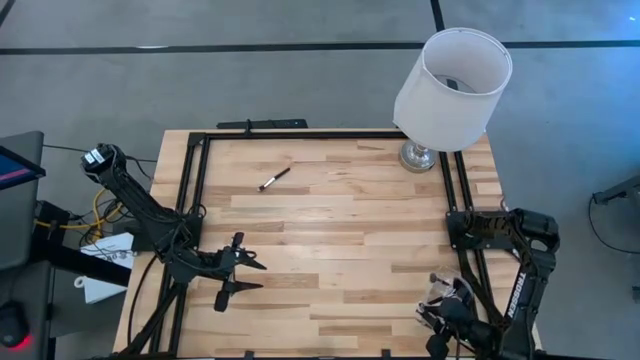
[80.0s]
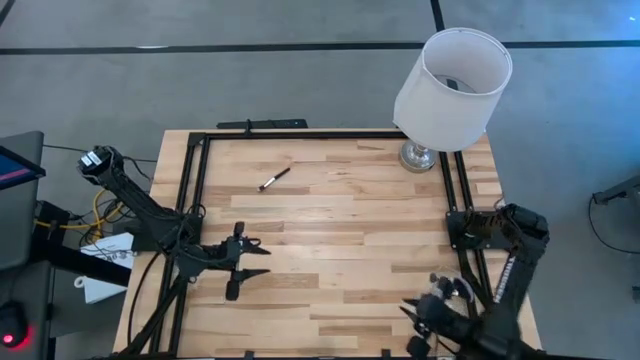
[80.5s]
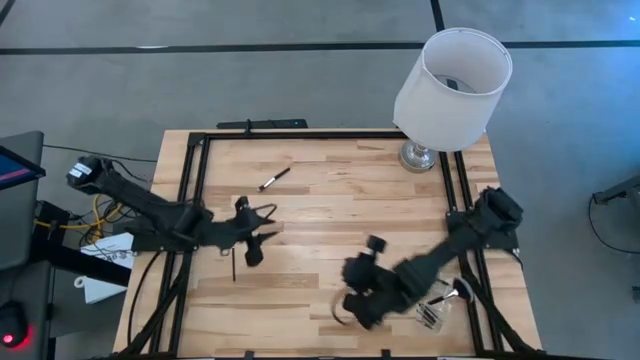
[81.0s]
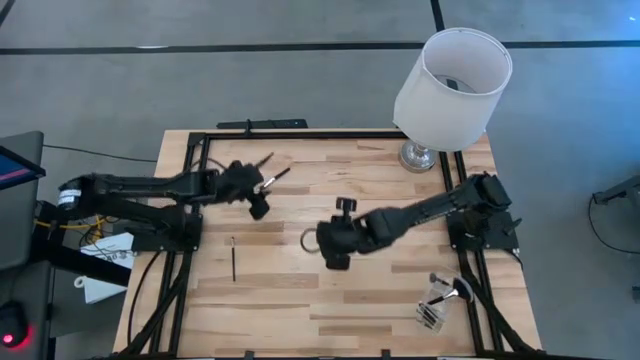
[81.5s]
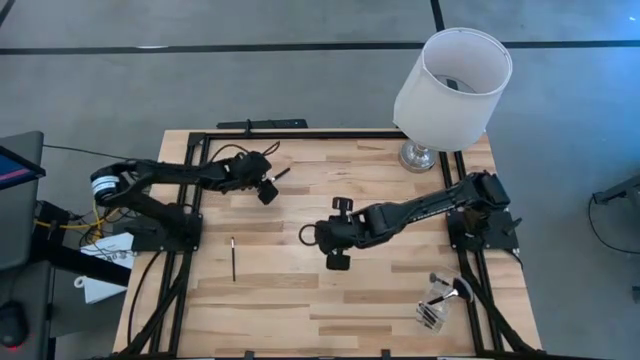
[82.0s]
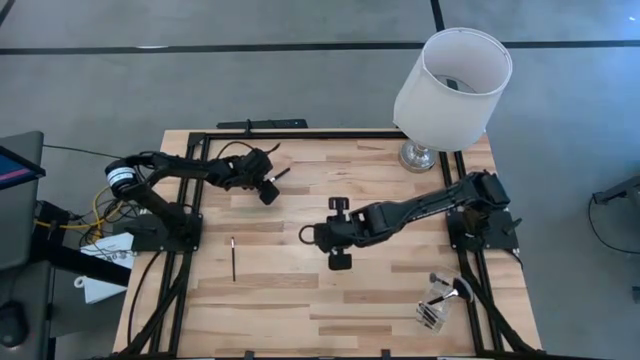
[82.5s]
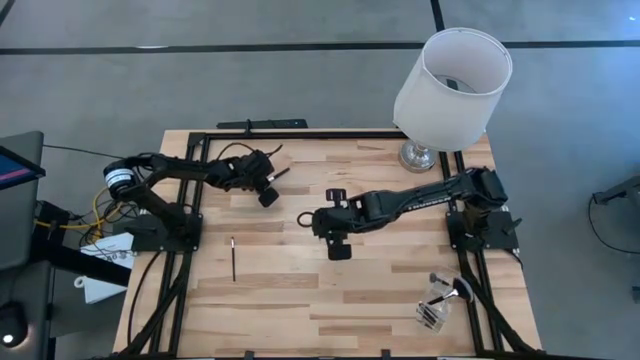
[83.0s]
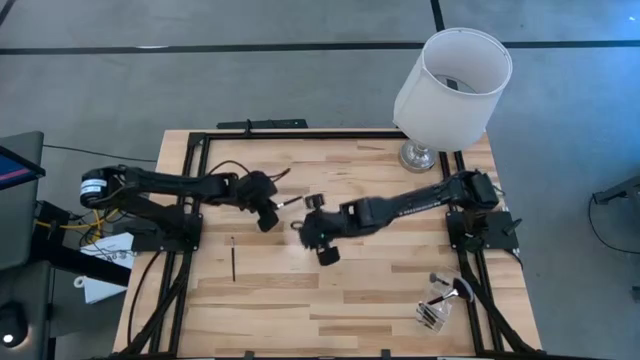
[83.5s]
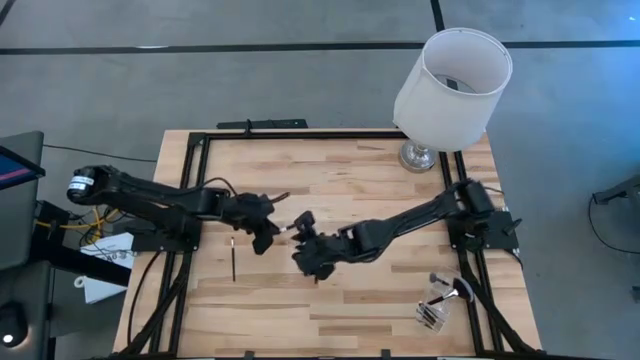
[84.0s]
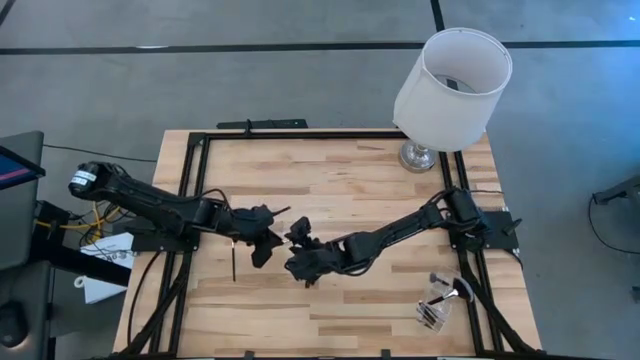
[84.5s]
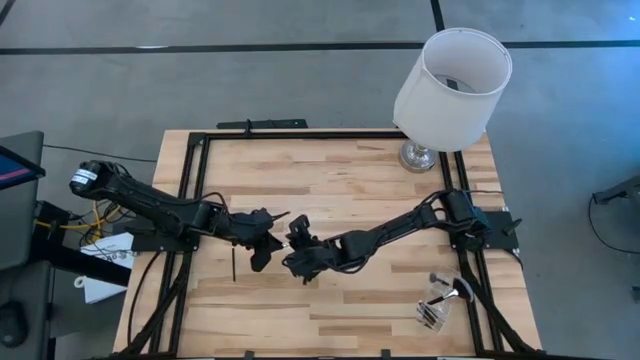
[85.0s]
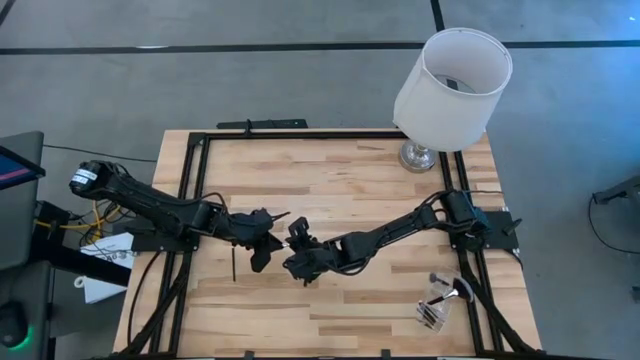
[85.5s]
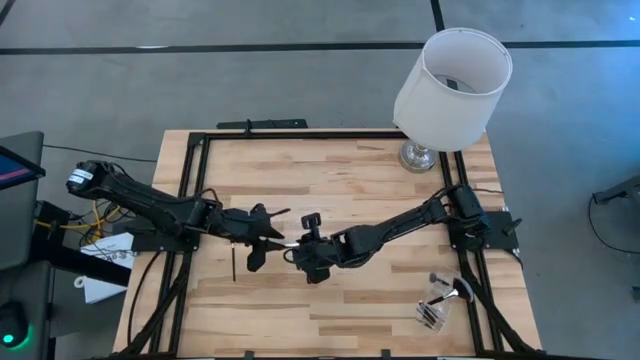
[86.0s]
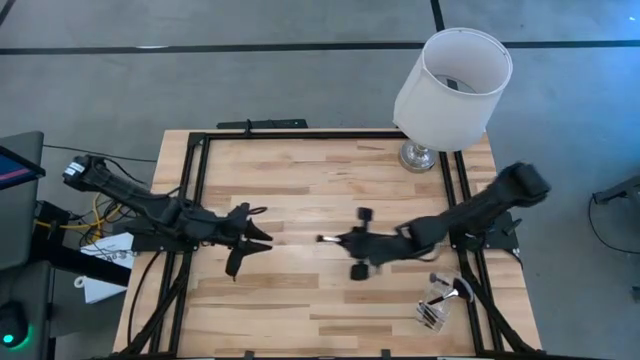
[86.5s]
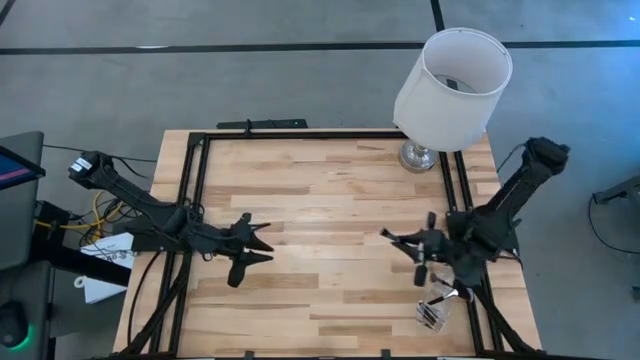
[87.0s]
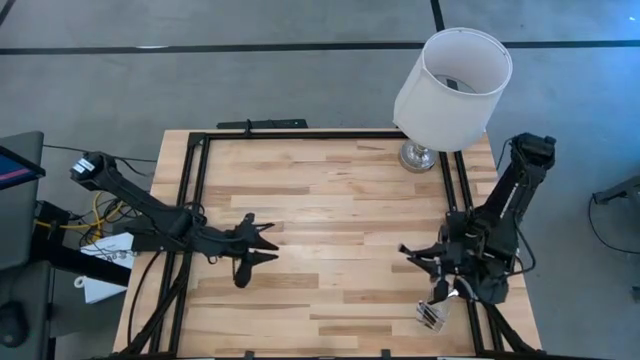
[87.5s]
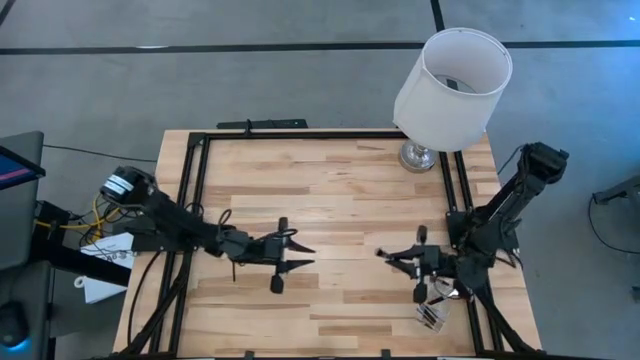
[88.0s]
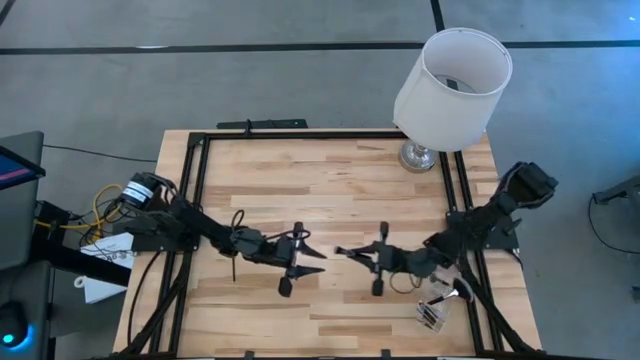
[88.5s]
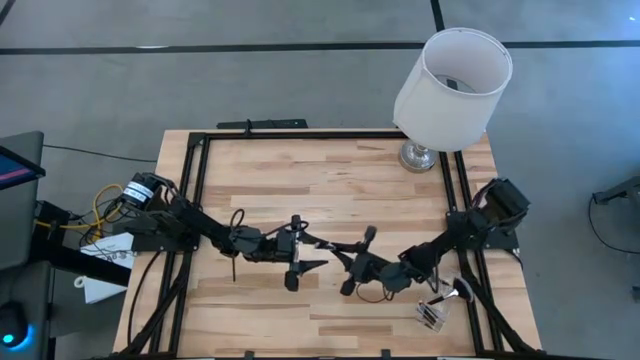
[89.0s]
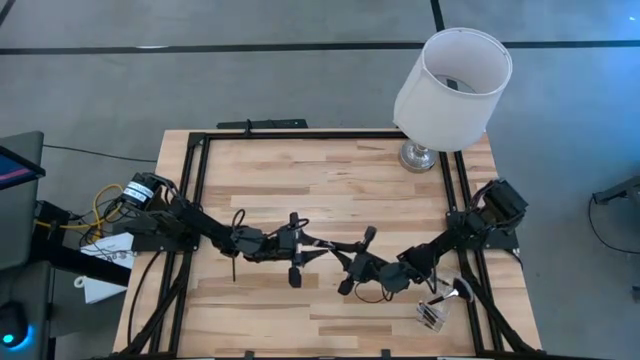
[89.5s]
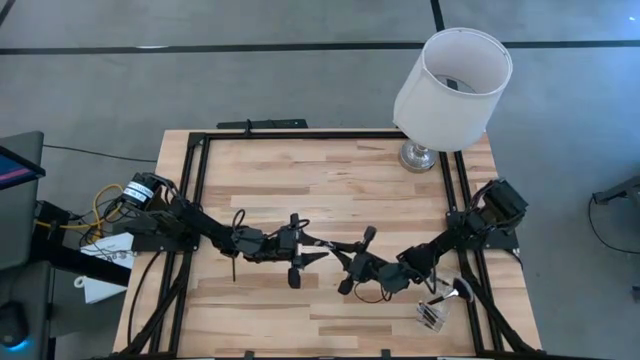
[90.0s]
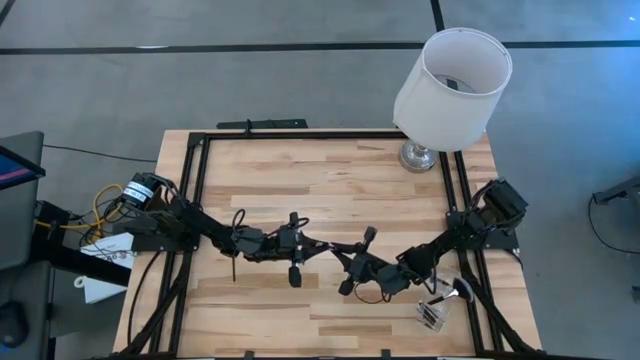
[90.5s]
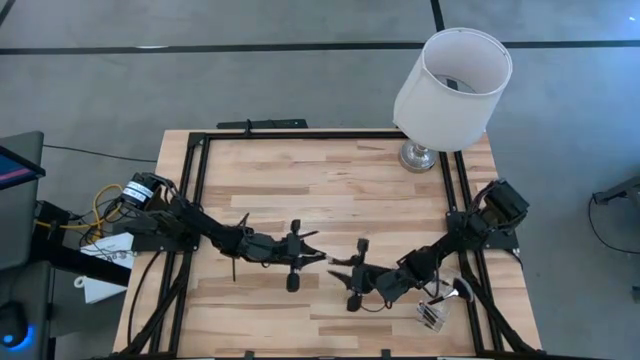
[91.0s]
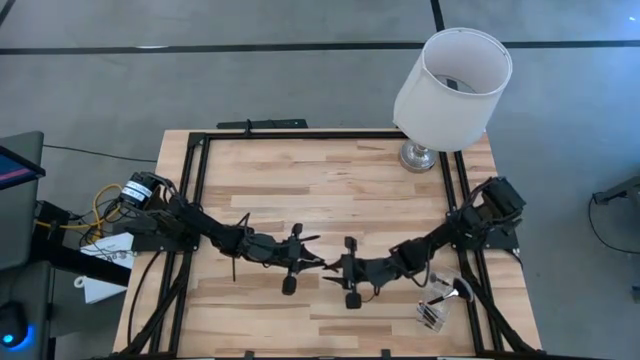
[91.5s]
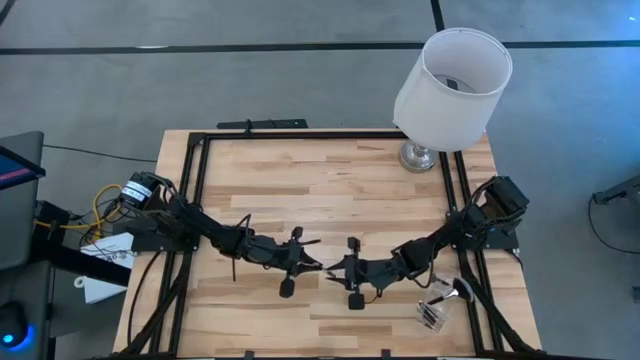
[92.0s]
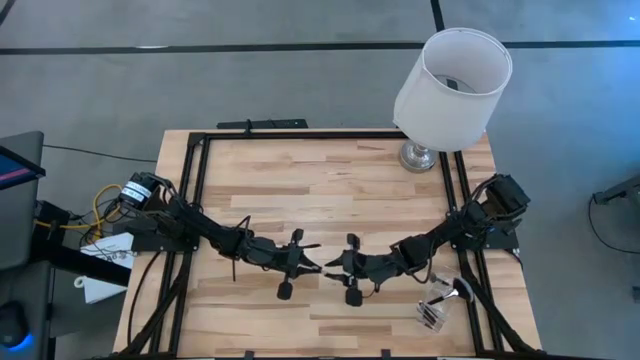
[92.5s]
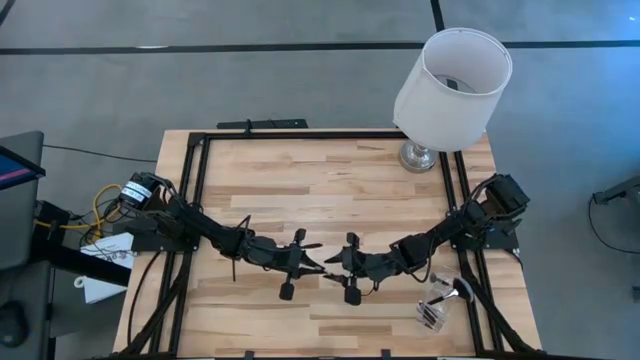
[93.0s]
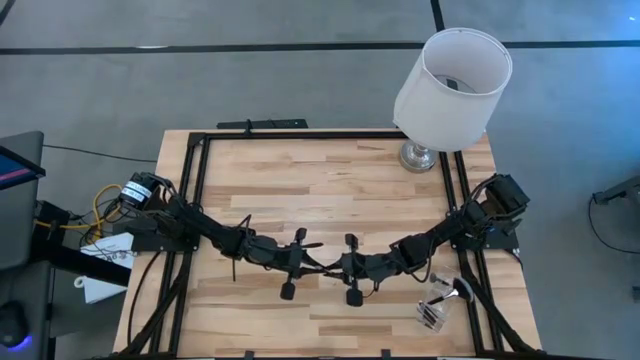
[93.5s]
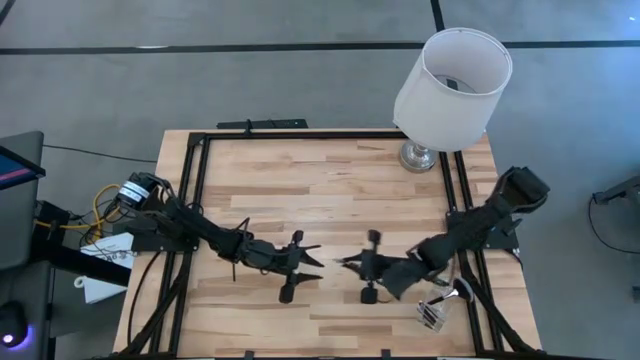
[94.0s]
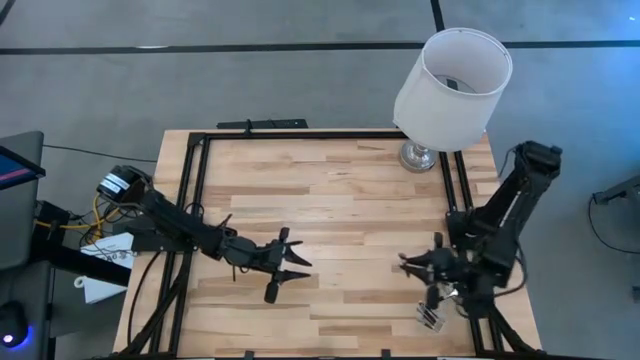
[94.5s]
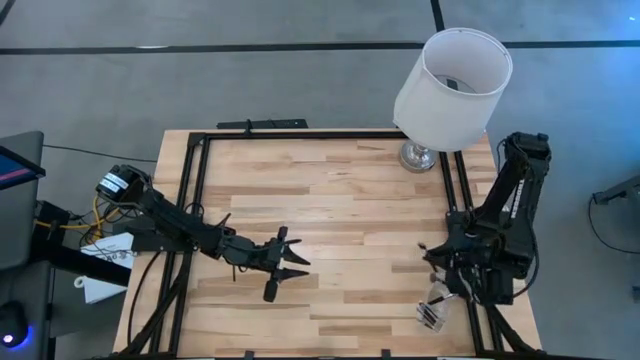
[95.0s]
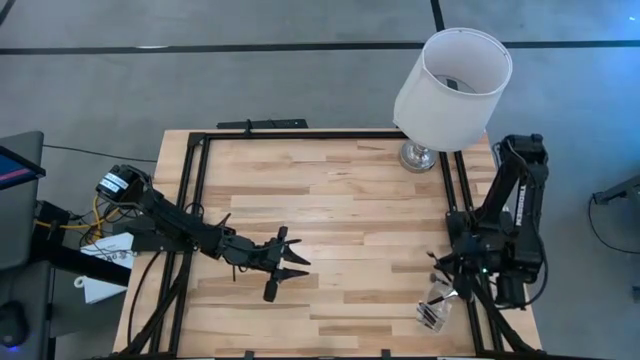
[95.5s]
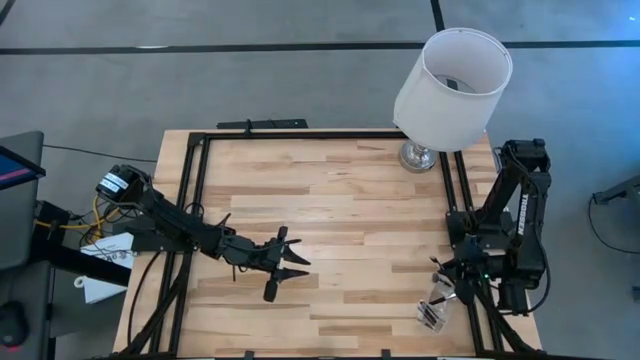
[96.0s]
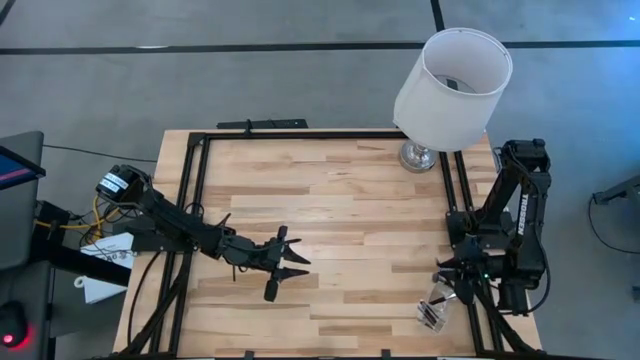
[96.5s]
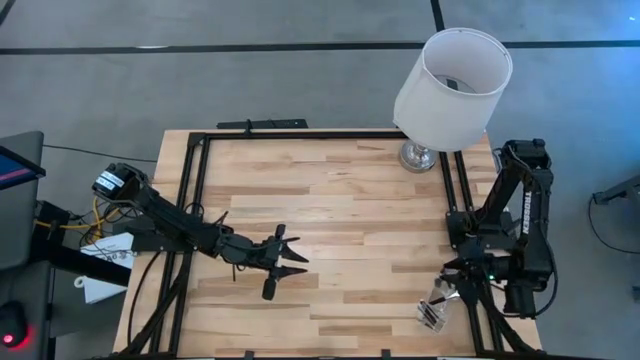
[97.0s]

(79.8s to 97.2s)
Task: Pick & Place Makeup Brushes
Put the black foundation brush into the transparent organizer

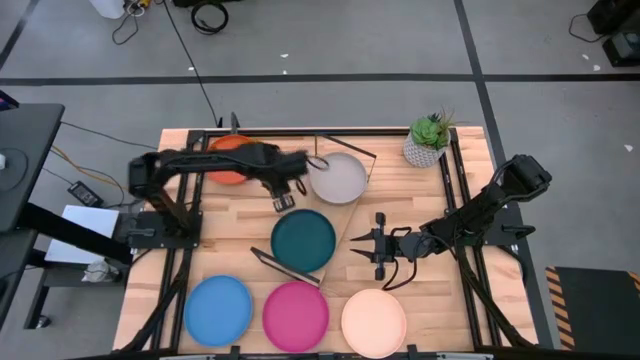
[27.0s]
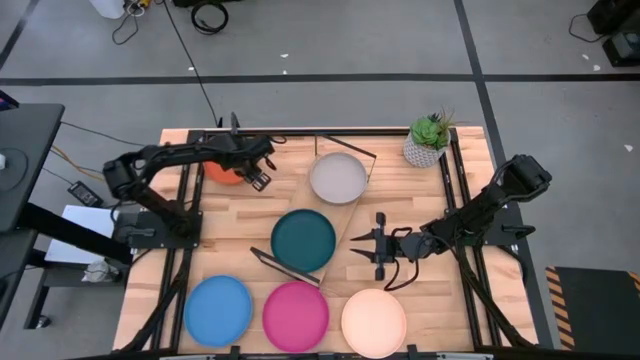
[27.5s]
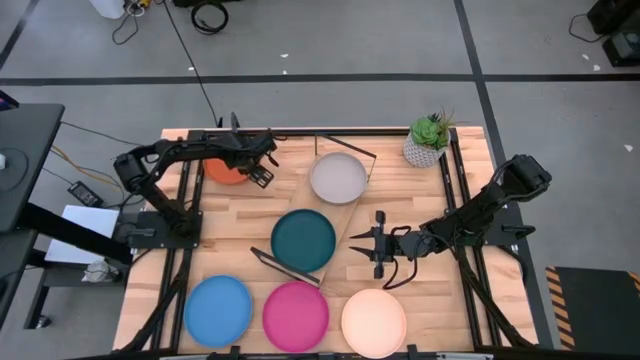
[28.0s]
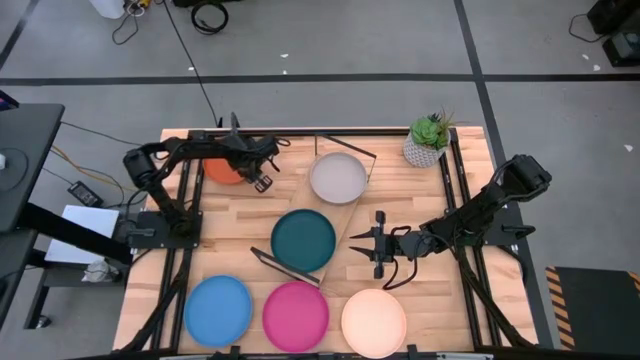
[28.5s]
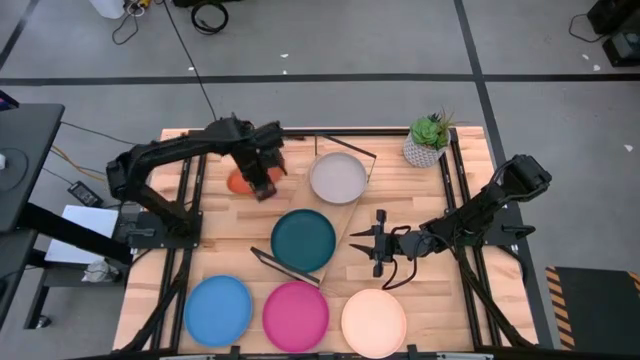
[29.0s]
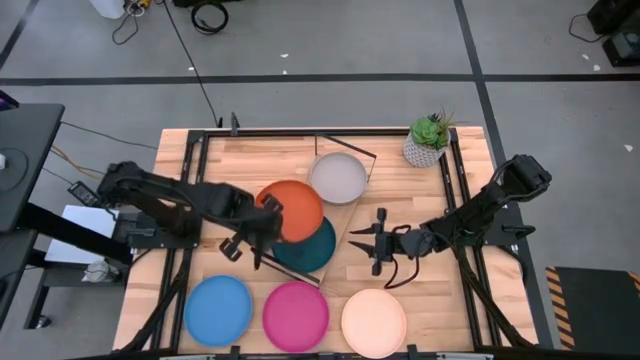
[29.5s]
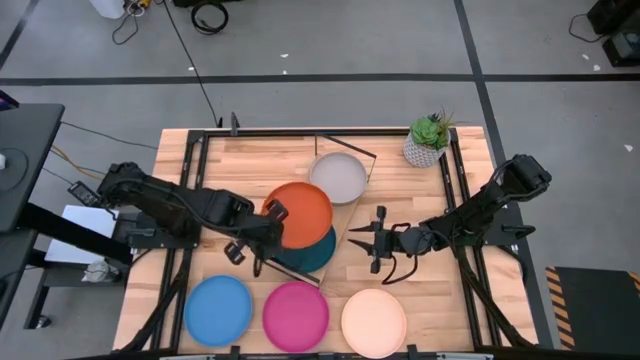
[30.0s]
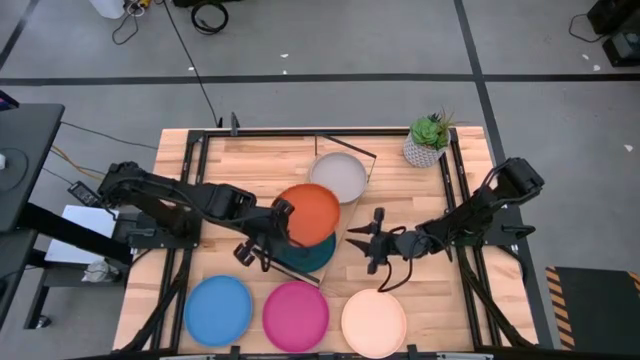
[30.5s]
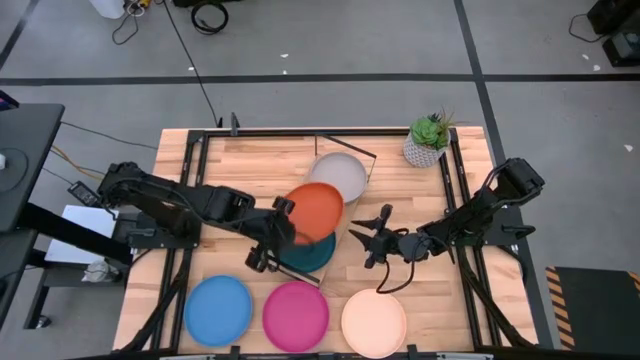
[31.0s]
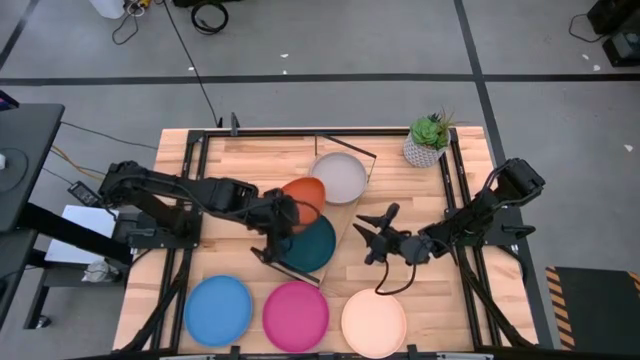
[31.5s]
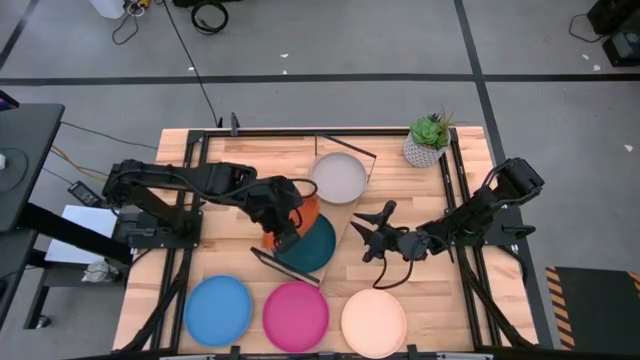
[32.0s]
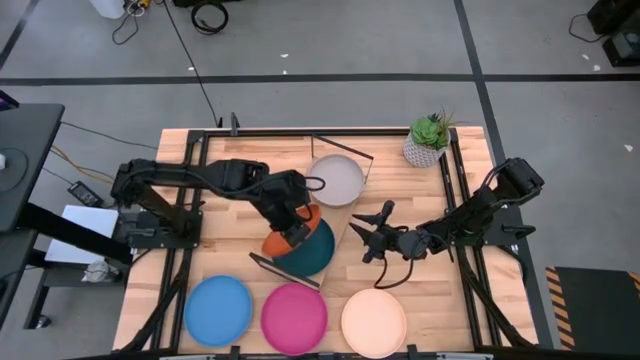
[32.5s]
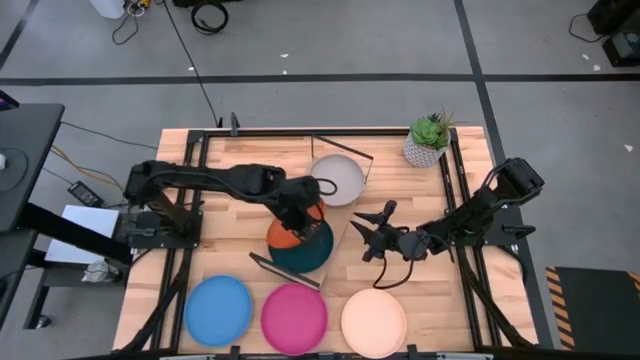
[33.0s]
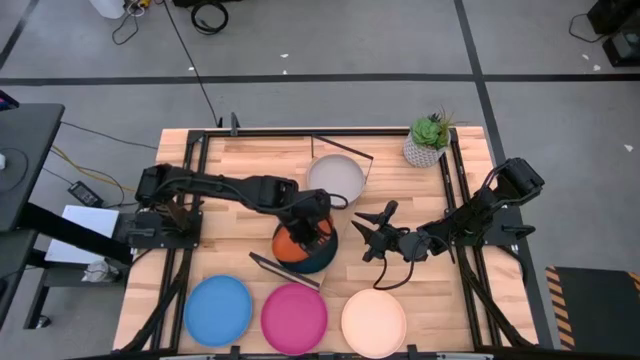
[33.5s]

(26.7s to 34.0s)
Task: Place and stack plates onto a shelf
Stack the orange plate on the top of the dark blue plate on the shelf
